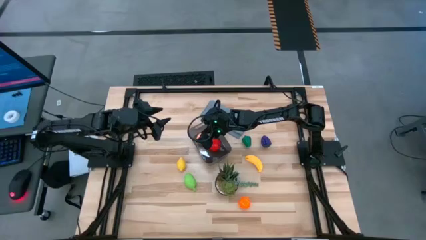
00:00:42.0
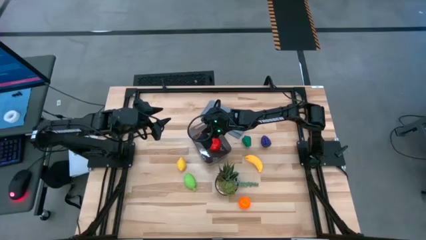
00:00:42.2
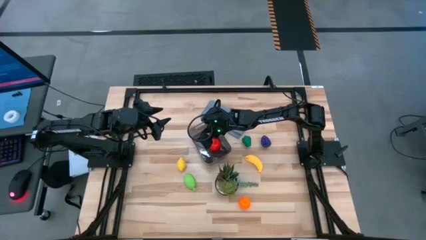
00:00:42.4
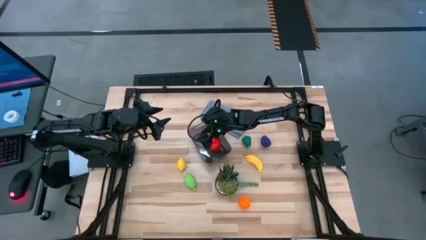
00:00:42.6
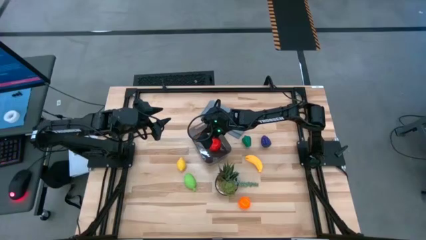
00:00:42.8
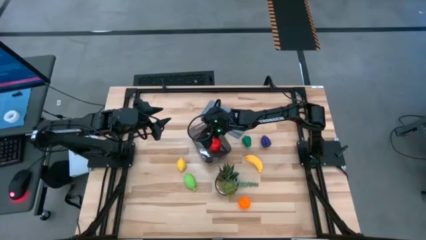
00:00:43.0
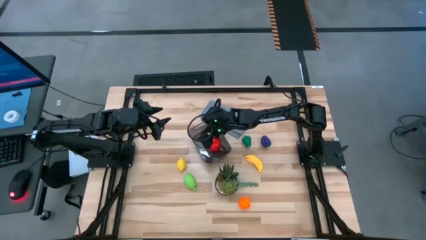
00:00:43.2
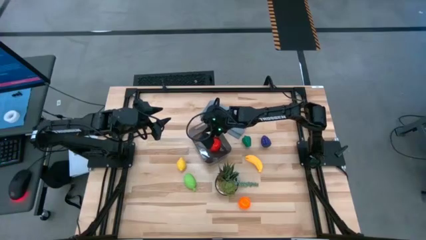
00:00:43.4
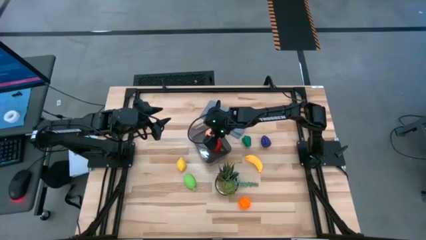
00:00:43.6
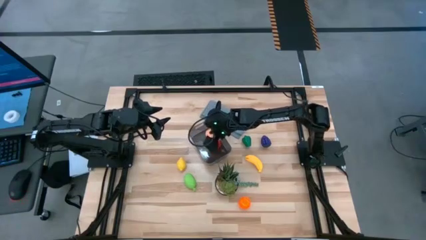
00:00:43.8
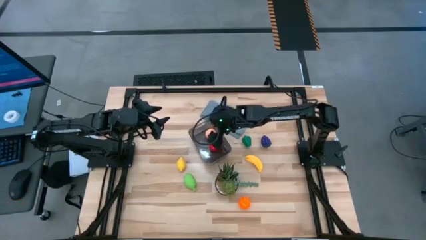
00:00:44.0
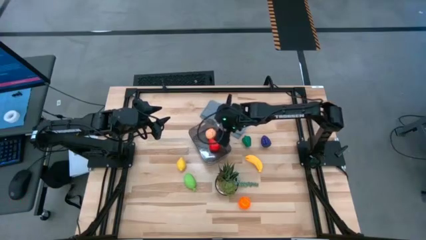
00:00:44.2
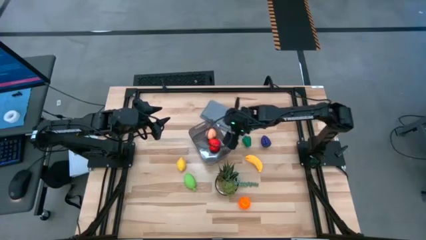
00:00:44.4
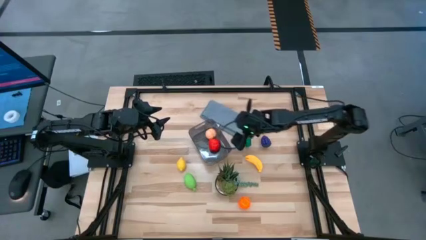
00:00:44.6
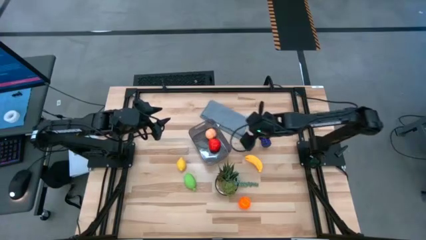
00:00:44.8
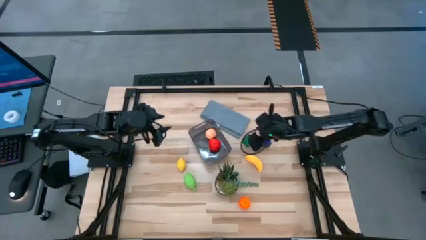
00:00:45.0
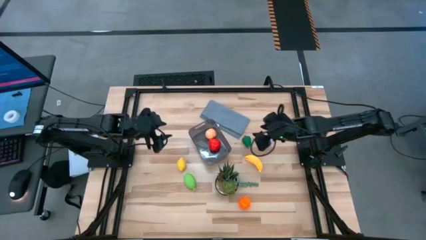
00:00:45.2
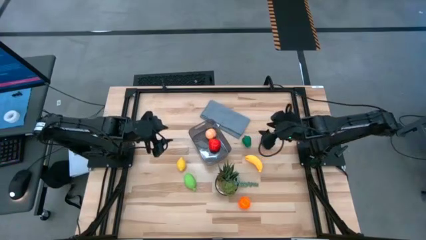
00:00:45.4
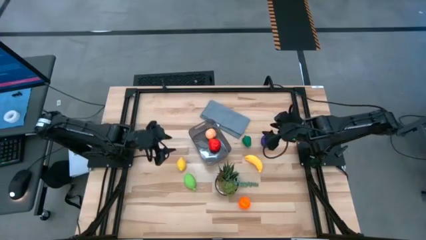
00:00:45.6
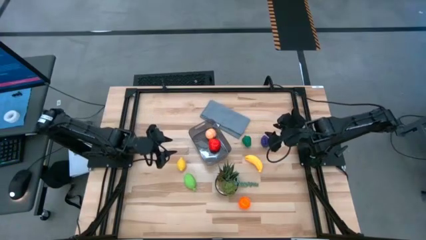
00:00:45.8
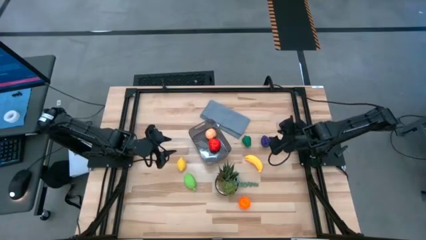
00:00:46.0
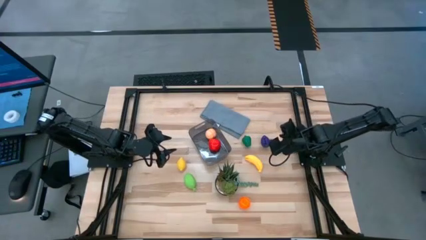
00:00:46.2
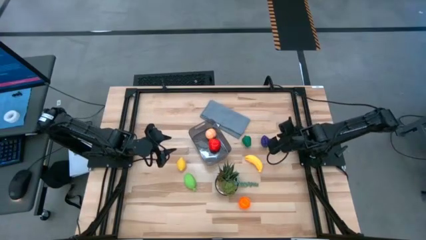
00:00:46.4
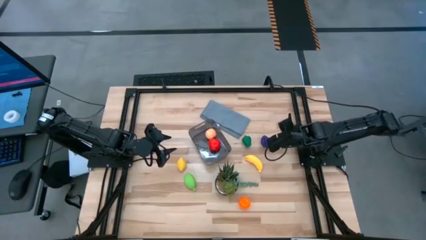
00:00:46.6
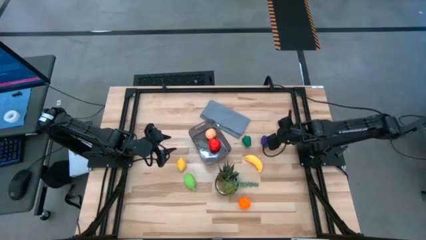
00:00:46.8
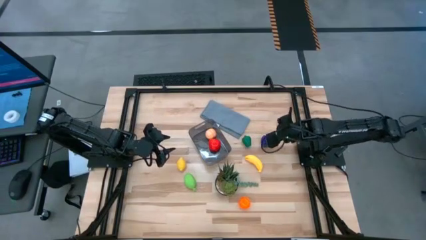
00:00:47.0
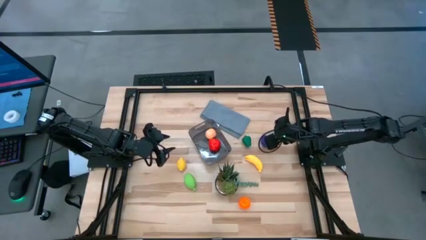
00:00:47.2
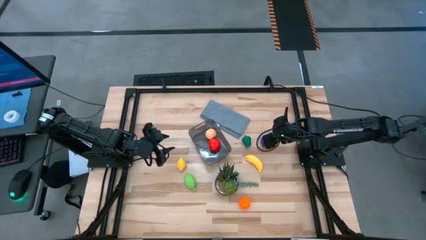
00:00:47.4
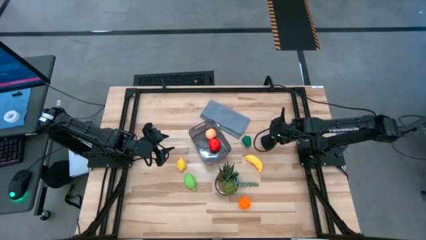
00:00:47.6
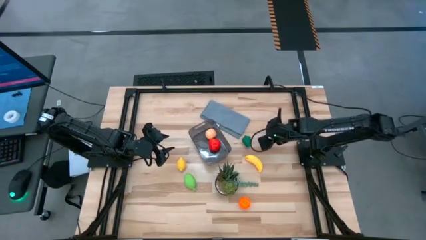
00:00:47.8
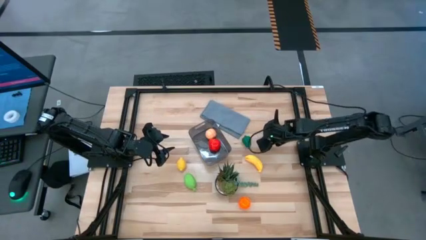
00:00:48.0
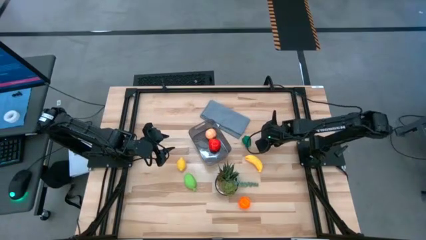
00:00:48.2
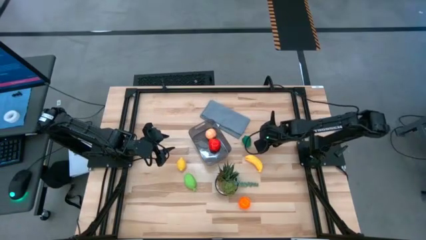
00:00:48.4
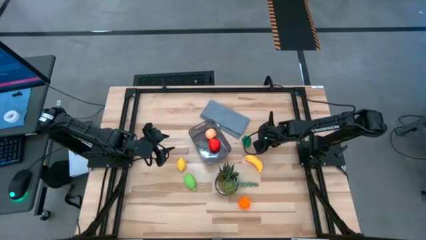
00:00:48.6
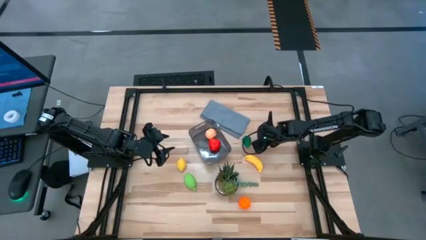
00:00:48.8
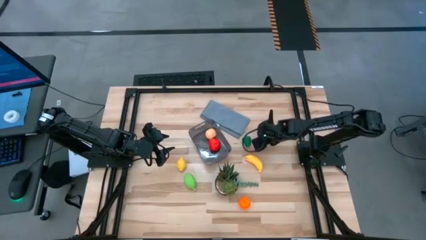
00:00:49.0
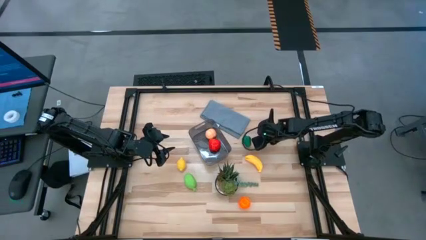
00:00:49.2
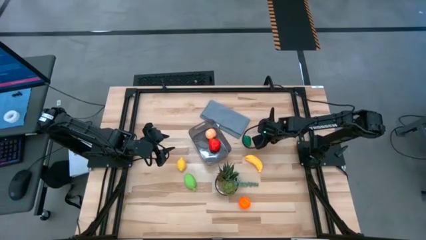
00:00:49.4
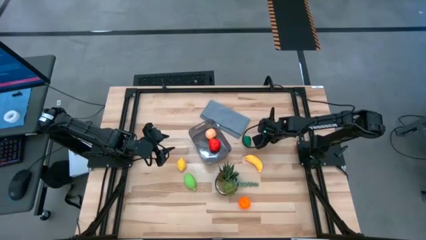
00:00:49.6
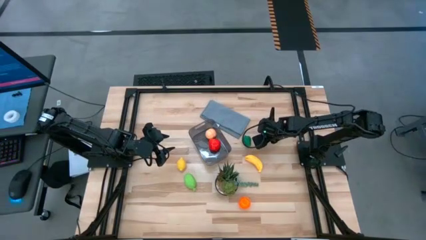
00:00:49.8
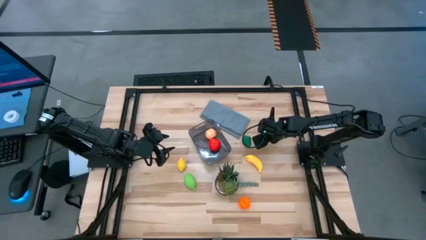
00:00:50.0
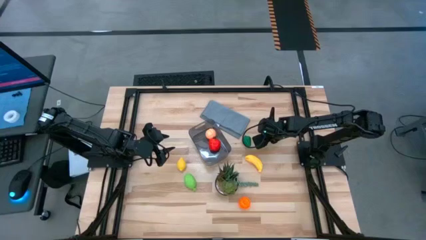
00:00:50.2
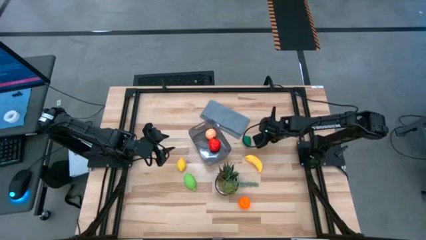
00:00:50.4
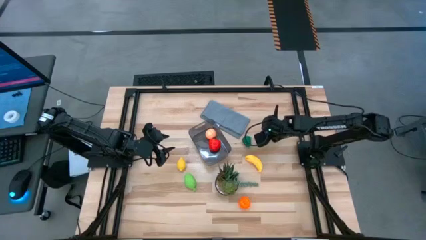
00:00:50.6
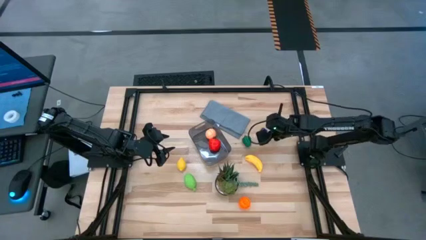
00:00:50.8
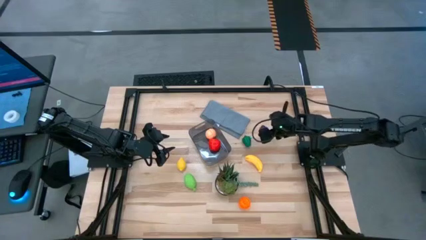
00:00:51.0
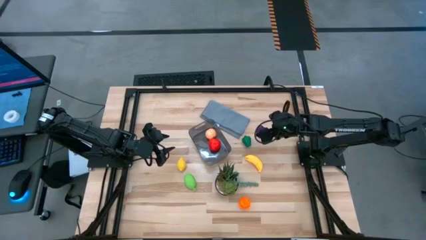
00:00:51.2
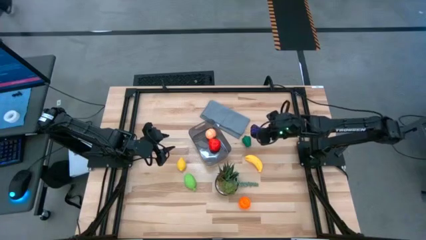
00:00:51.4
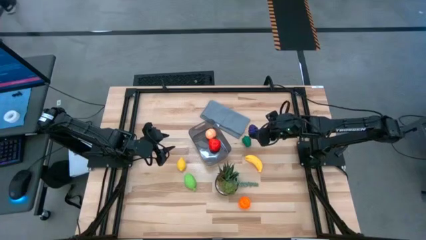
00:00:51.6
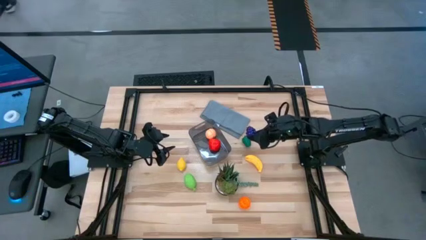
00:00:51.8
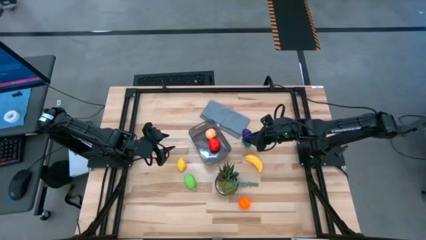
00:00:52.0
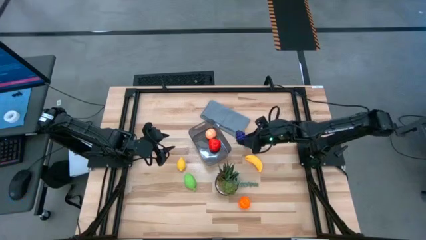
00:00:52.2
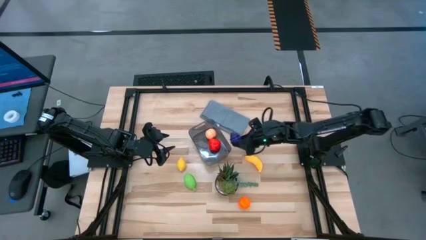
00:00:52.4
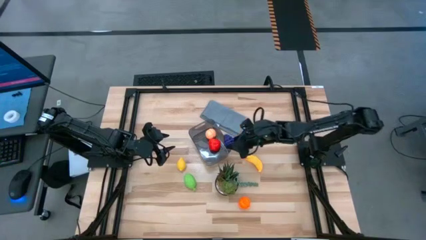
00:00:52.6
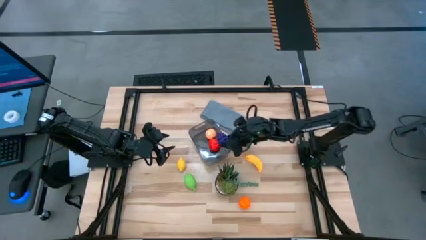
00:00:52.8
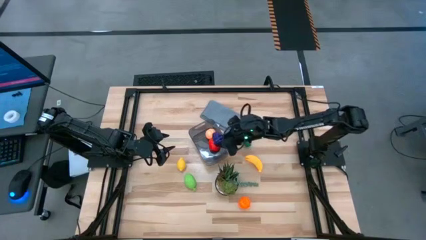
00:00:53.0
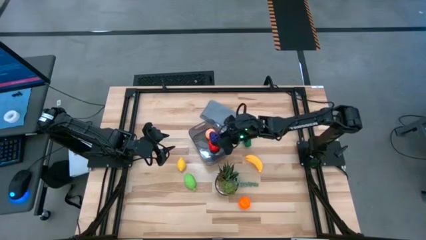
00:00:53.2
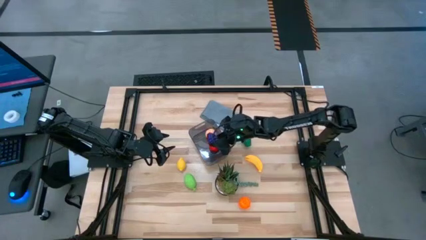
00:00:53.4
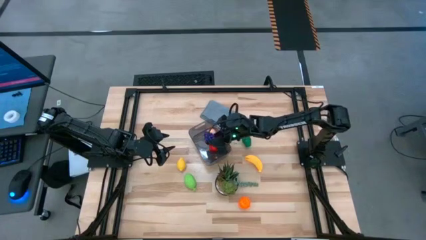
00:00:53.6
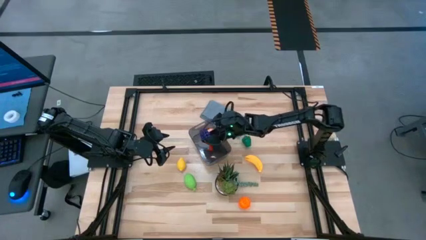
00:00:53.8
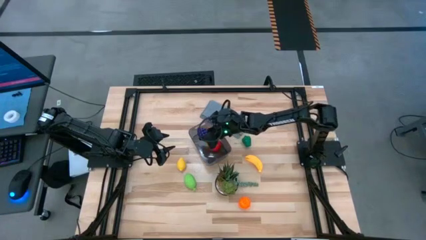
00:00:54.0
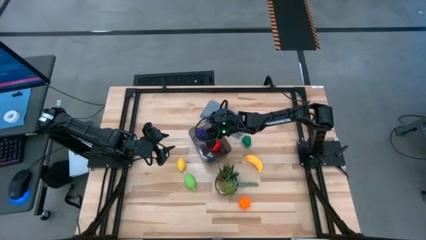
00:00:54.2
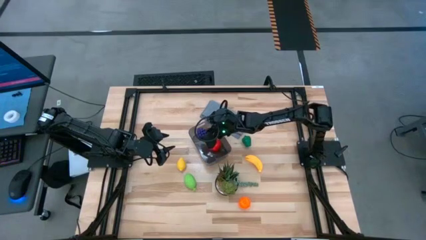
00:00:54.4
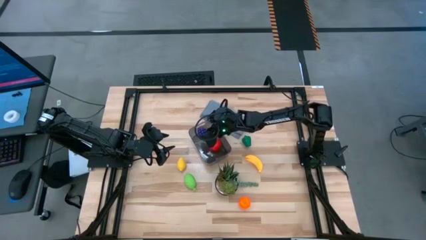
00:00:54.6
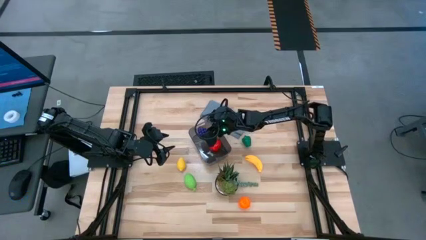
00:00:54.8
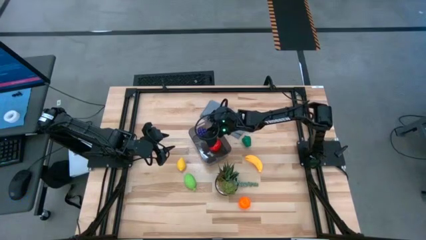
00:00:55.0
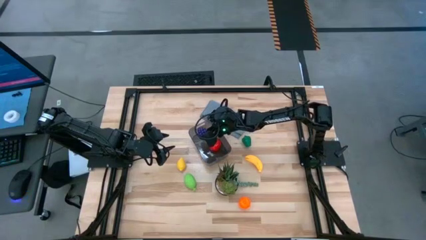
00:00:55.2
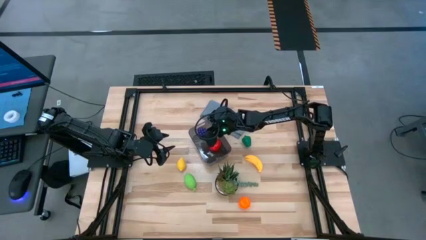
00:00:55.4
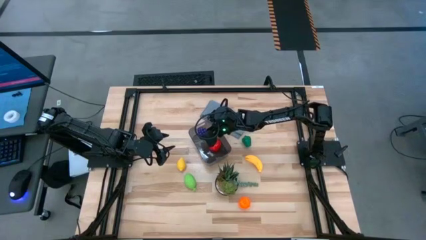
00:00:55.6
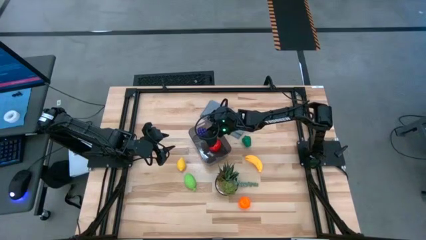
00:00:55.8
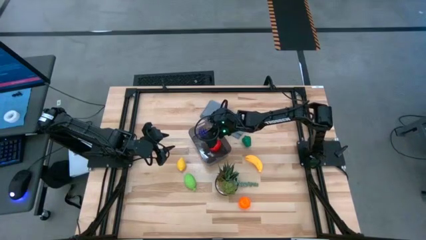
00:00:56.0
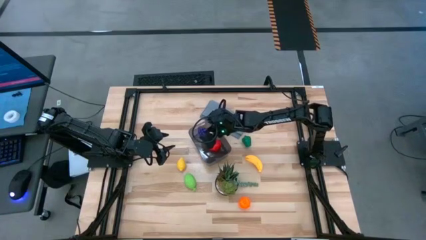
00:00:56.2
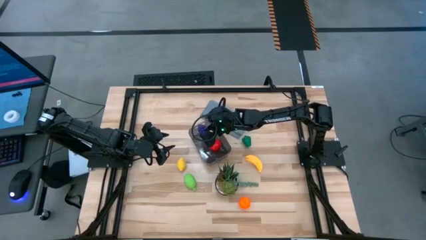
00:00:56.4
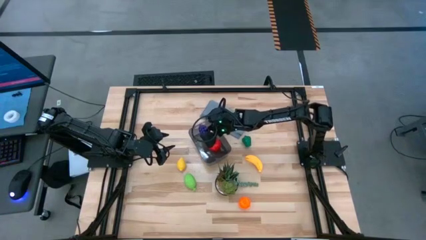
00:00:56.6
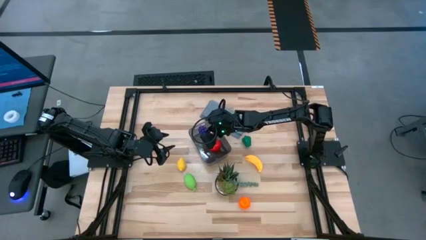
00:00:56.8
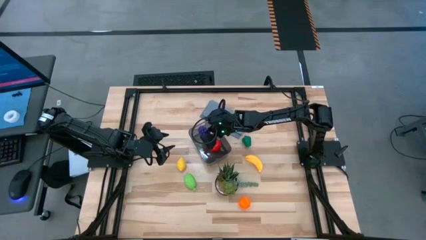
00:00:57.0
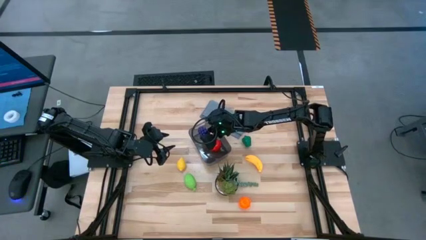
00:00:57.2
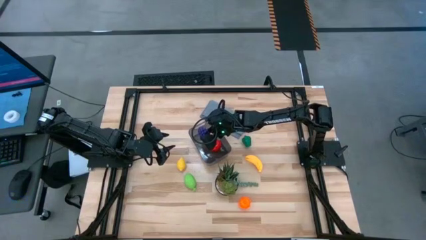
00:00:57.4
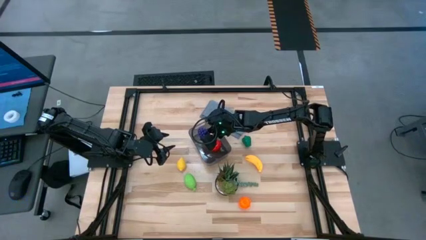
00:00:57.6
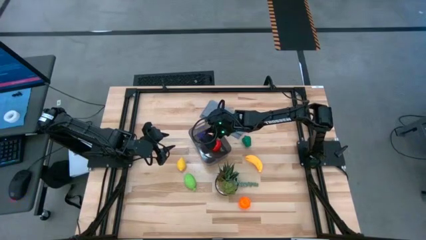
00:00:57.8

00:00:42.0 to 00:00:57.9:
Task: Pick and placing Produce into tupperware
Put the violet grapes into the black bin

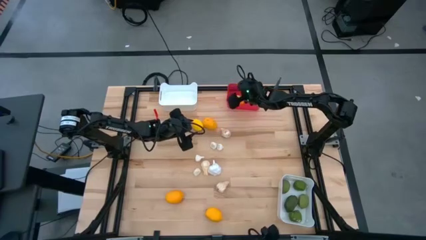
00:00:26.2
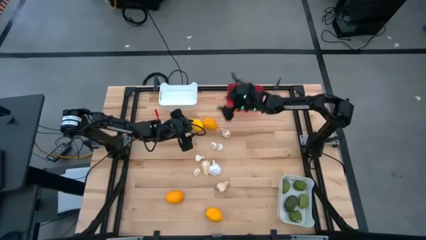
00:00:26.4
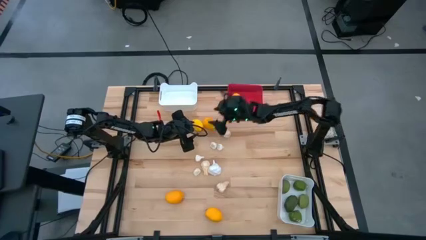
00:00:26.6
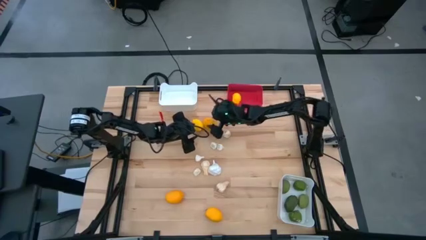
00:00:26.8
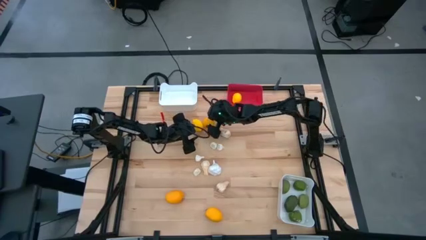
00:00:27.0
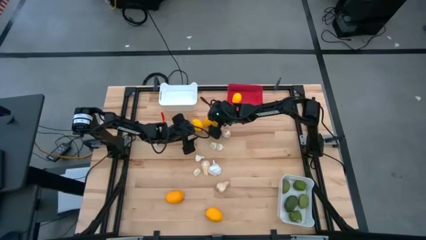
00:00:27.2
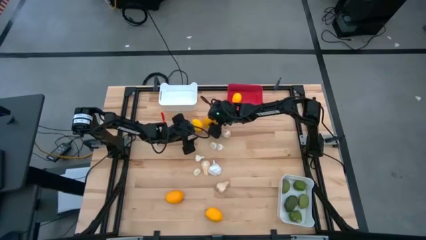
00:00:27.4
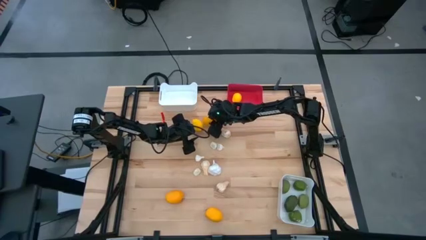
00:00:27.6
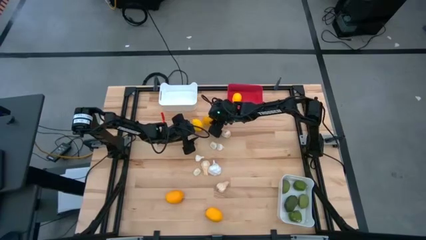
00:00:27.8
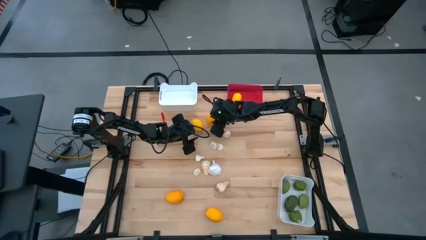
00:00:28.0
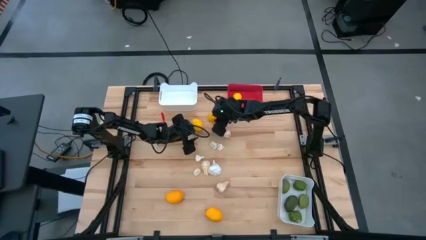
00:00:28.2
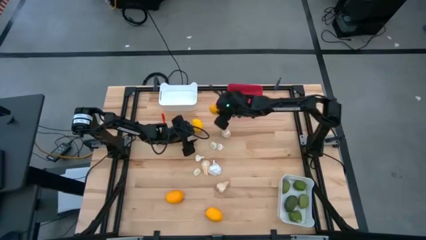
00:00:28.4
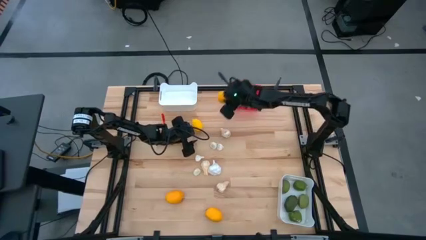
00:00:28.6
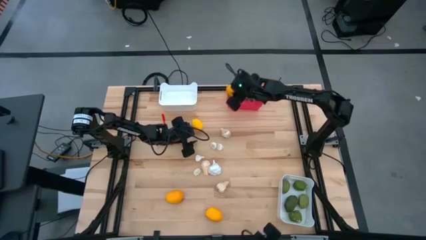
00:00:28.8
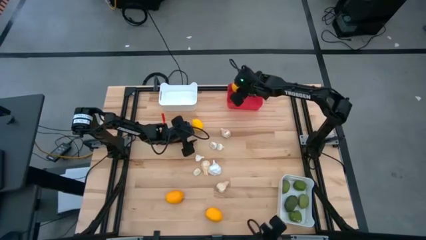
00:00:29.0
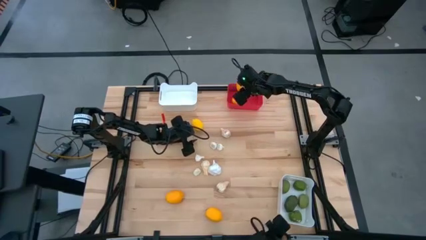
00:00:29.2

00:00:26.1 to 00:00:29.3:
Task: Sort produce into baskets
Put the yellow lemon into the red bin
